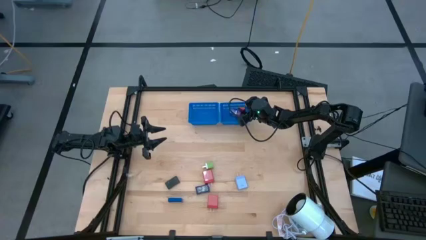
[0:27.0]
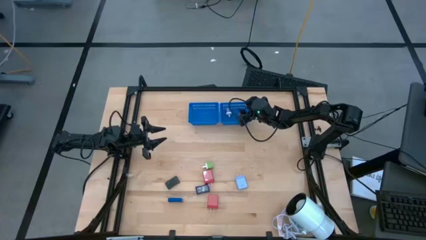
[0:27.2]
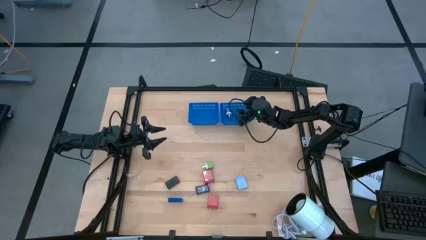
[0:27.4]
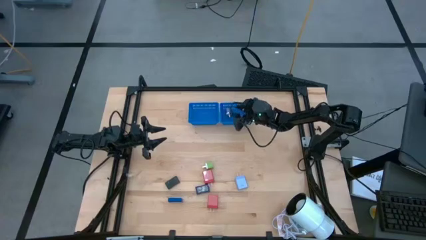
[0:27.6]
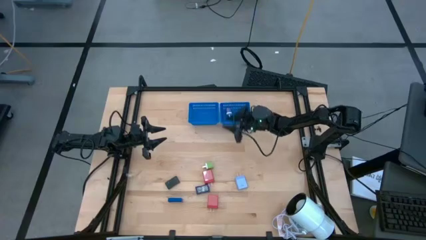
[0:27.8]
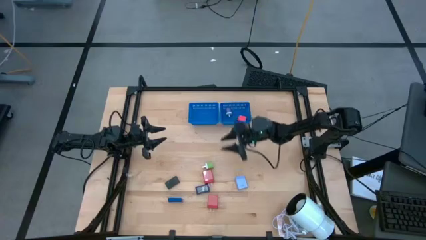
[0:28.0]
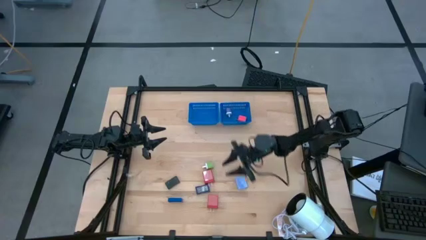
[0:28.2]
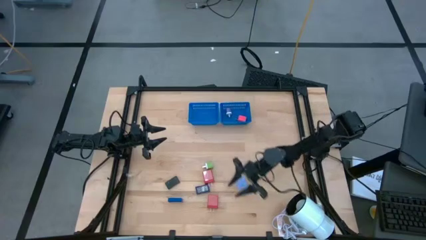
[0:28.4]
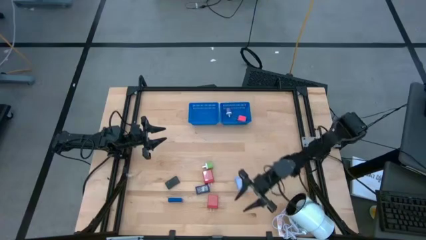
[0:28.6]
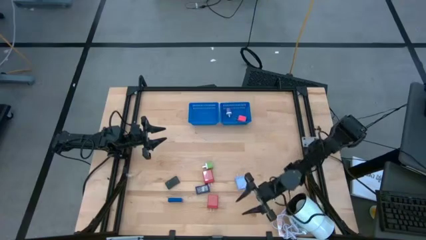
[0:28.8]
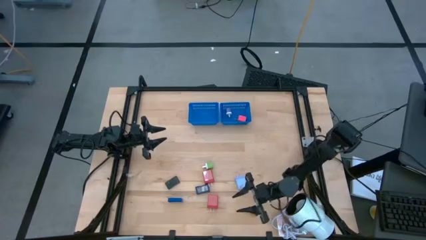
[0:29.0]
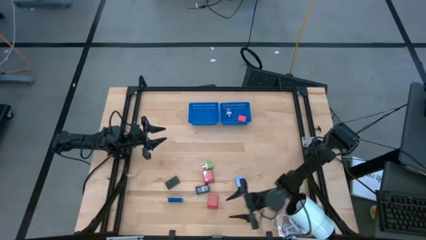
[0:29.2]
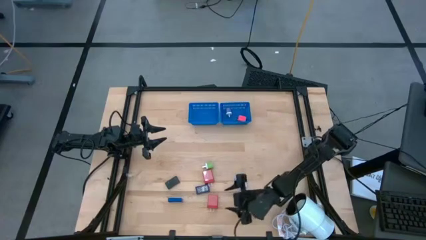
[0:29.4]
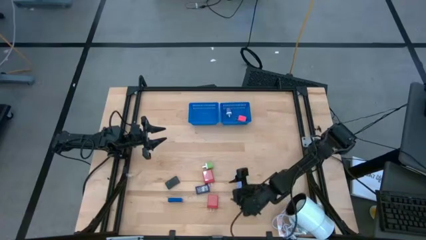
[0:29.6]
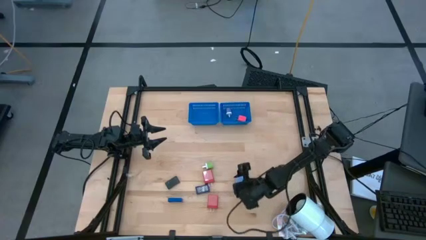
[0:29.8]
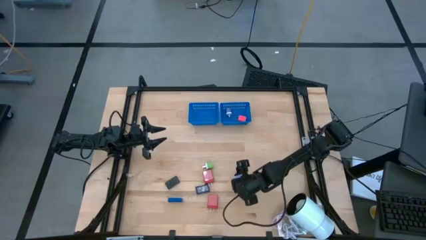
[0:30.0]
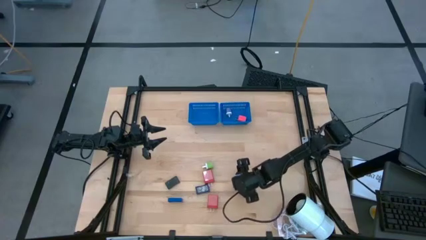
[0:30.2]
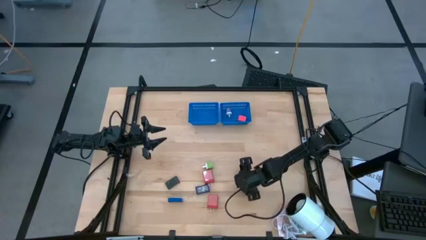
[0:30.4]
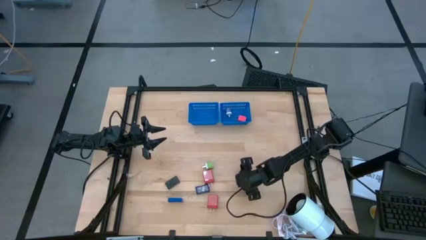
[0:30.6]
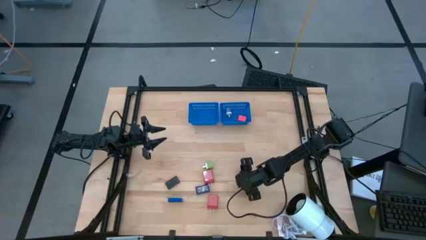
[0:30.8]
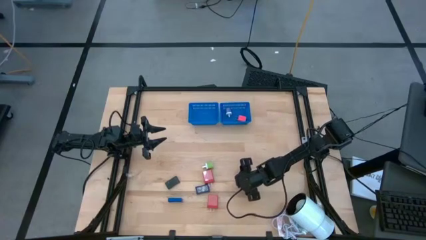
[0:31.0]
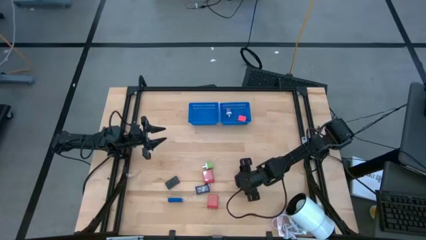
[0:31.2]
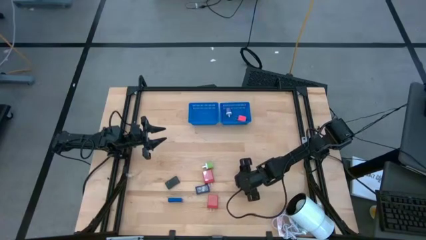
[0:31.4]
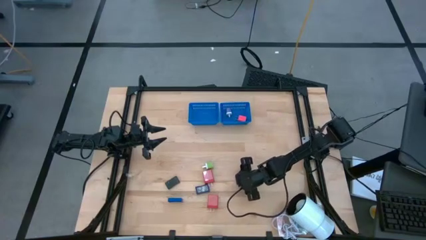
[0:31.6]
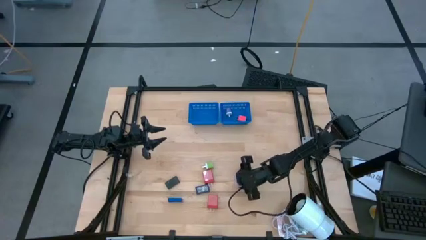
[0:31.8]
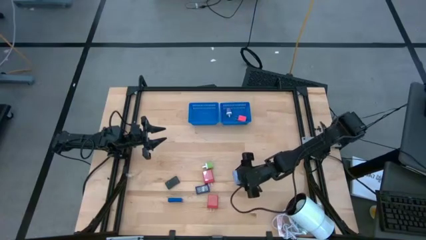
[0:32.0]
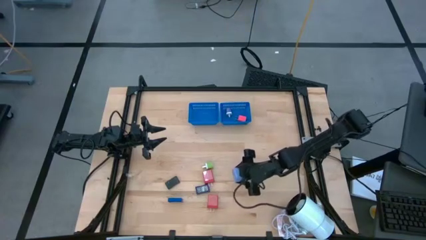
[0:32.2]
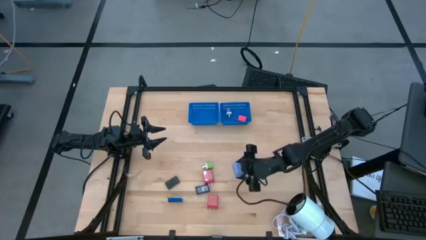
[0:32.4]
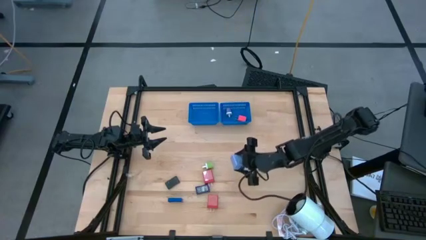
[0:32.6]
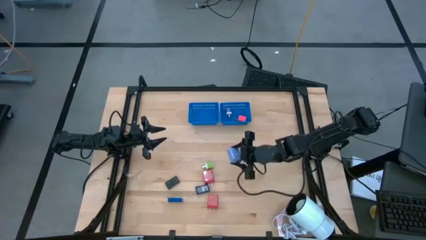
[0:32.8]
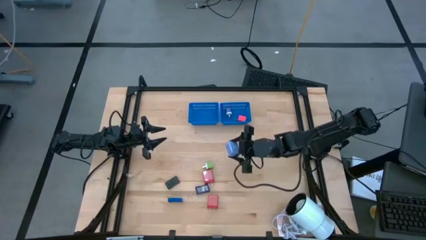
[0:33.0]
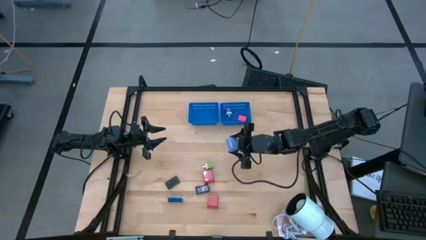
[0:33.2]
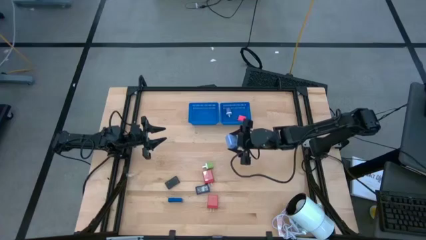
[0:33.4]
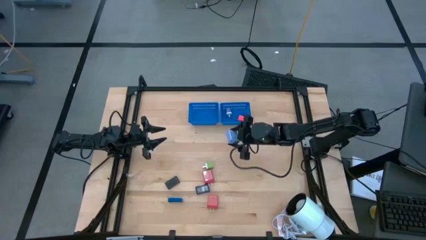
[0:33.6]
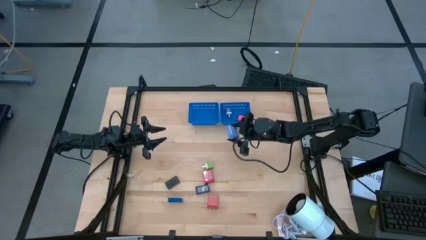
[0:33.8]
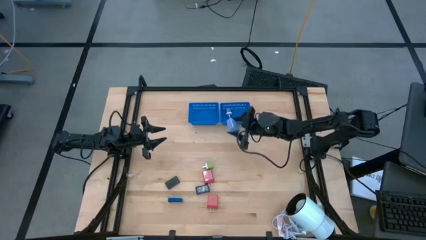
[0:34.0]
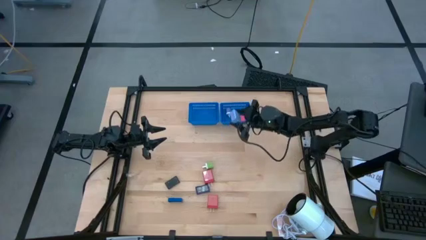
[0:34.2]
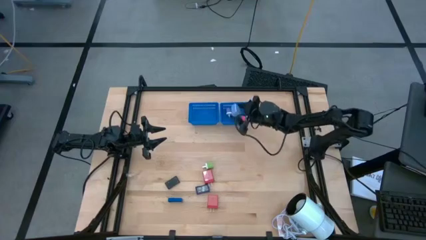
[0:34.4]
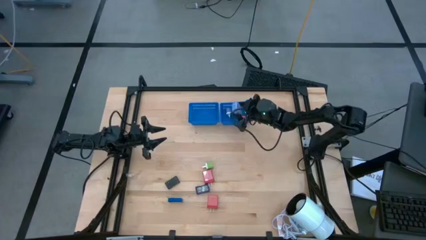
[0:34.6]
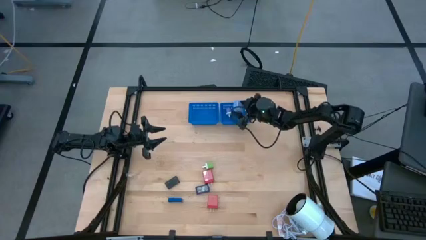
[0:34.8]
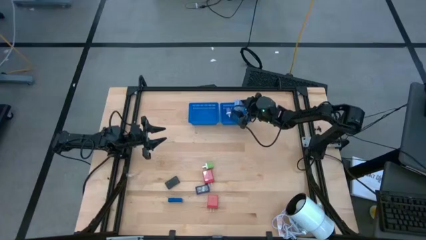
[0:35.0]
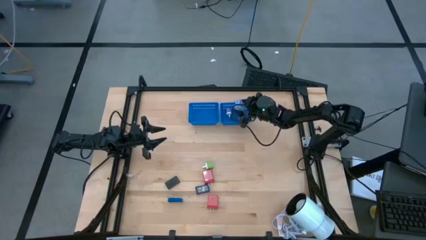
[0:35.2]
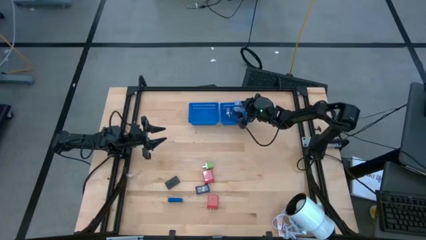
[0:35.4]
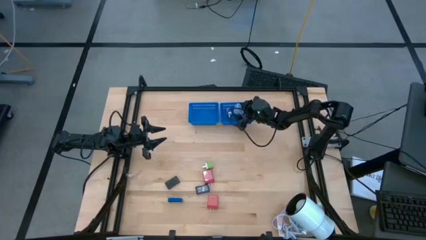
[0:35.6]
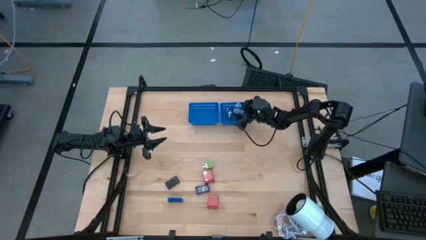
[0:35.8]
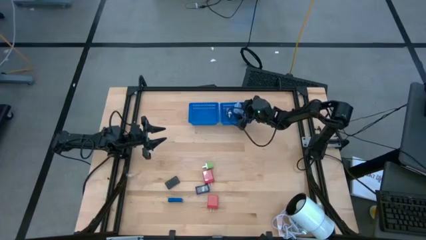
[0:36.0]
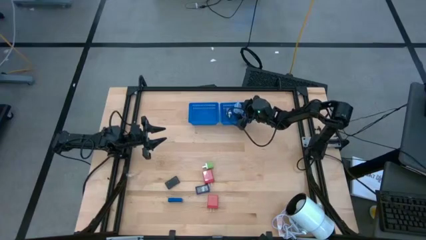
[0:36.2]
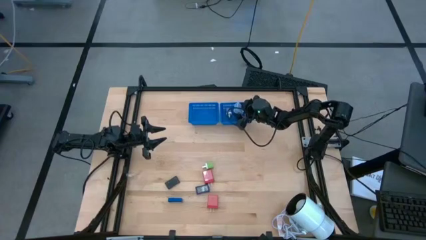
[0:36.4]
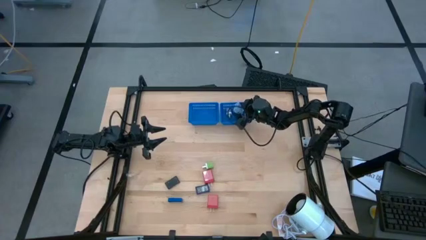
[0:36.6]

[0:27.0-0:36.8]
Task: Pick & Place Office items
Put the light blue charger adapter into the right blue bin

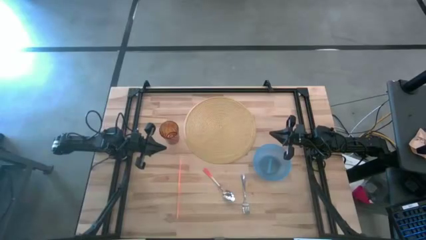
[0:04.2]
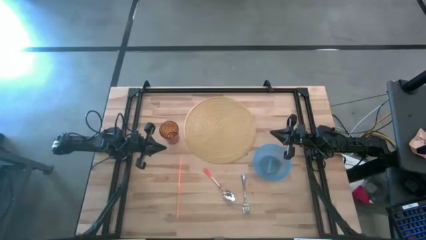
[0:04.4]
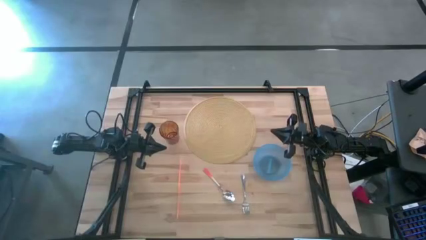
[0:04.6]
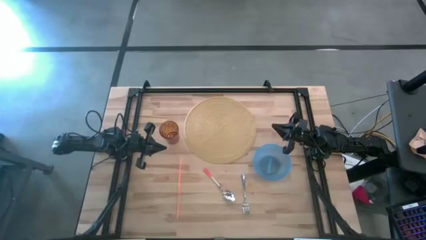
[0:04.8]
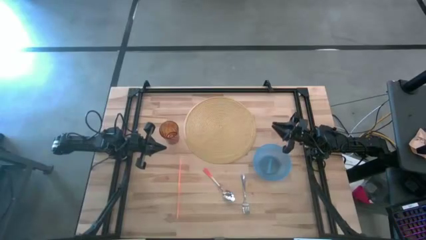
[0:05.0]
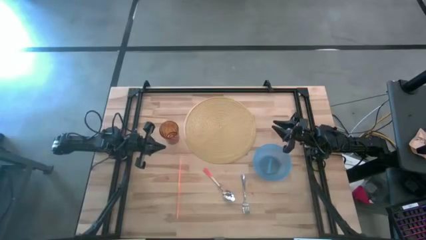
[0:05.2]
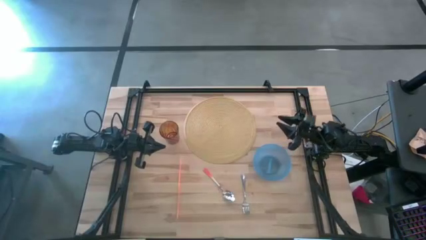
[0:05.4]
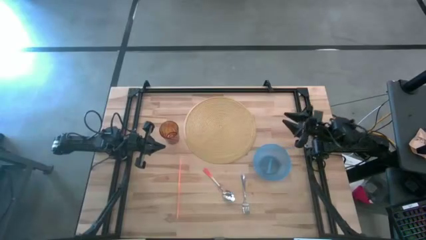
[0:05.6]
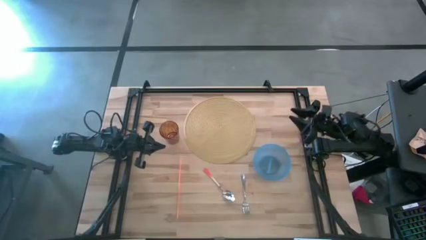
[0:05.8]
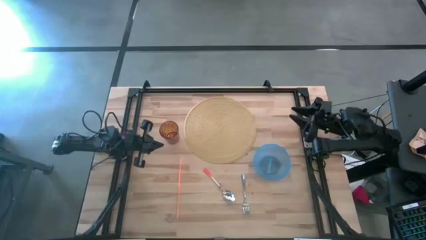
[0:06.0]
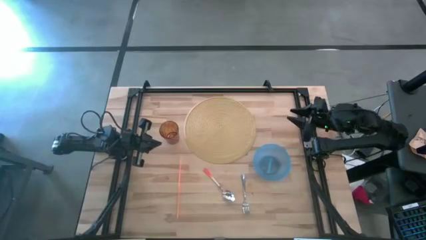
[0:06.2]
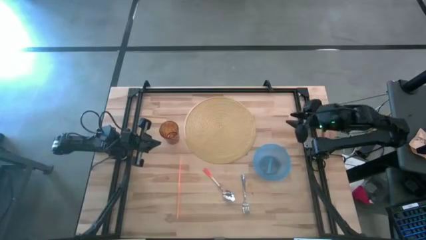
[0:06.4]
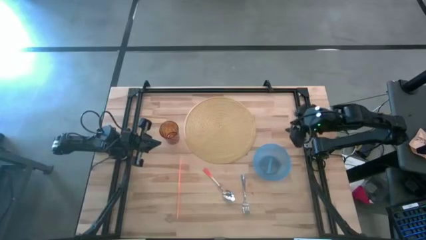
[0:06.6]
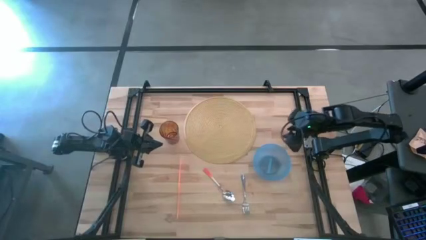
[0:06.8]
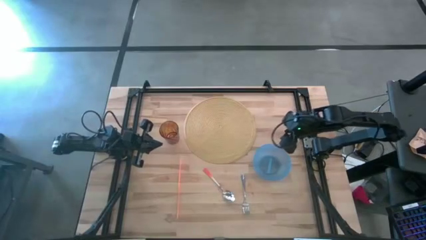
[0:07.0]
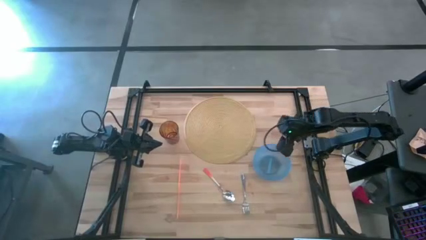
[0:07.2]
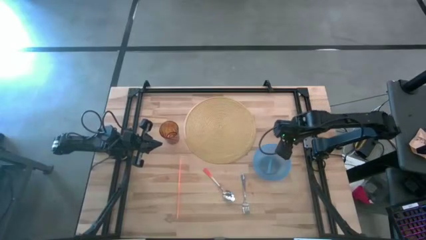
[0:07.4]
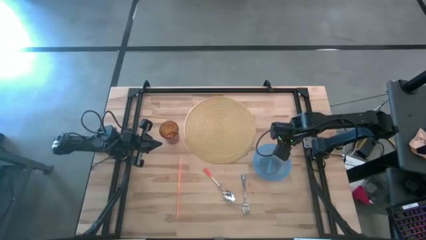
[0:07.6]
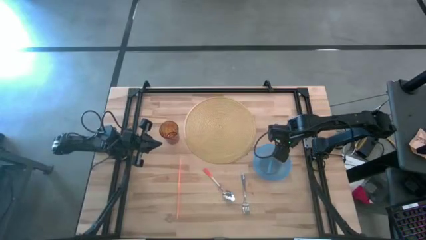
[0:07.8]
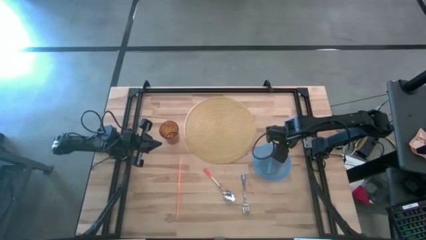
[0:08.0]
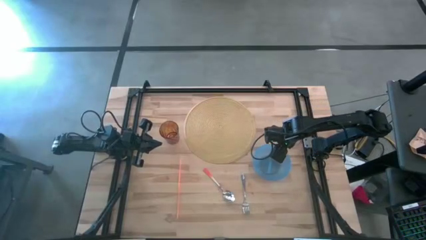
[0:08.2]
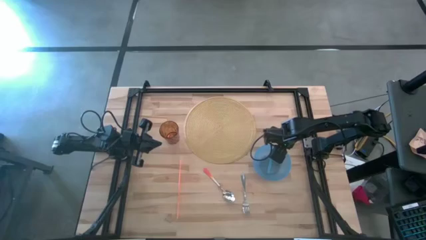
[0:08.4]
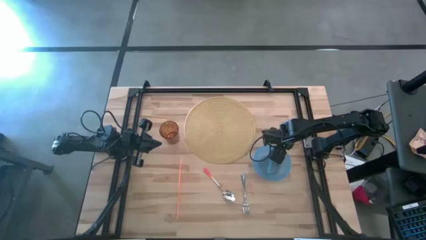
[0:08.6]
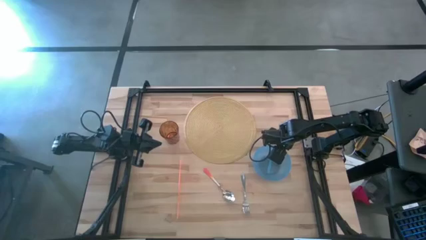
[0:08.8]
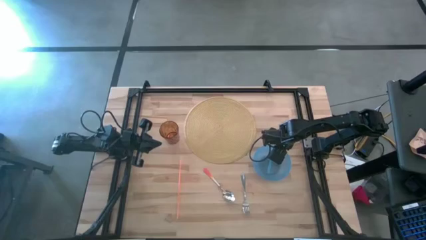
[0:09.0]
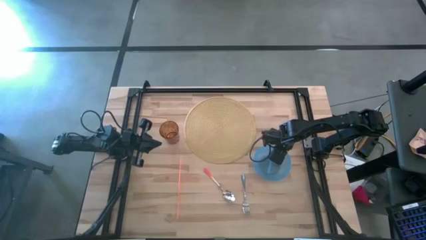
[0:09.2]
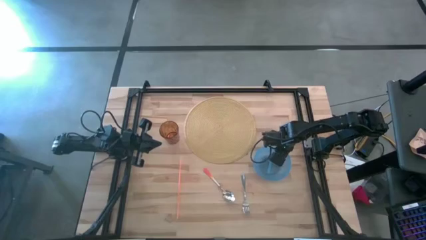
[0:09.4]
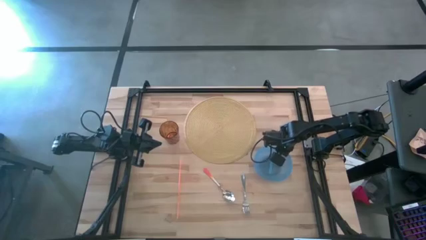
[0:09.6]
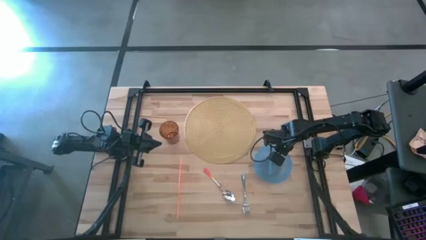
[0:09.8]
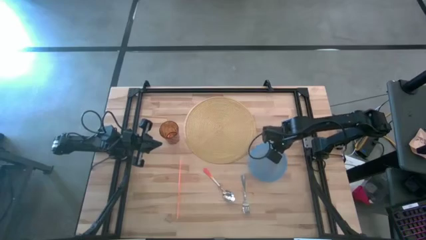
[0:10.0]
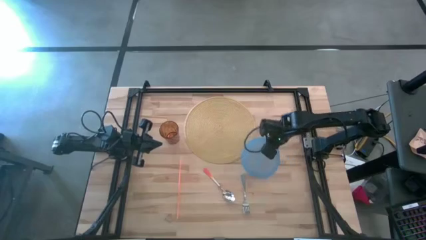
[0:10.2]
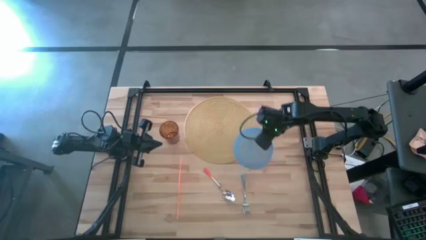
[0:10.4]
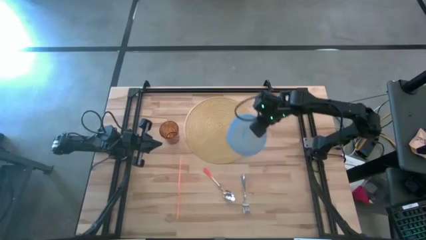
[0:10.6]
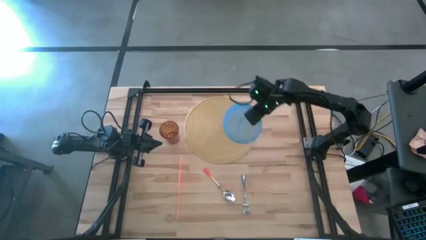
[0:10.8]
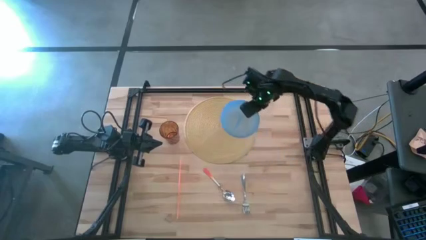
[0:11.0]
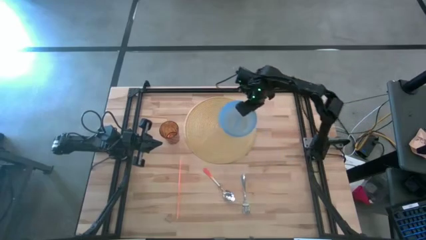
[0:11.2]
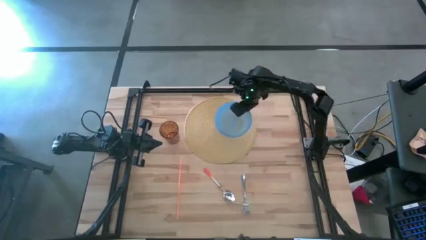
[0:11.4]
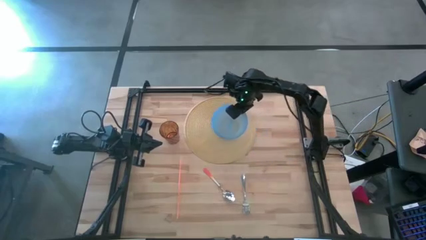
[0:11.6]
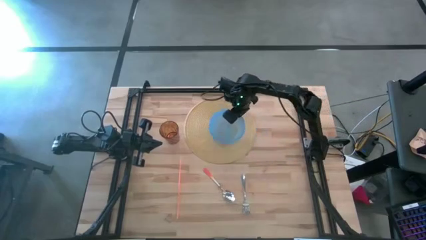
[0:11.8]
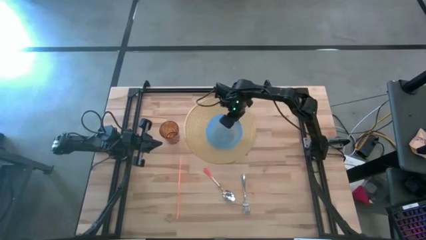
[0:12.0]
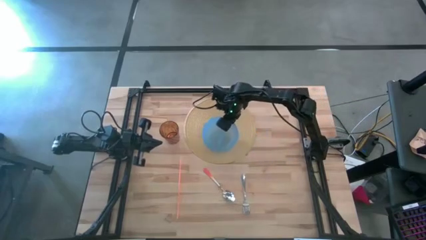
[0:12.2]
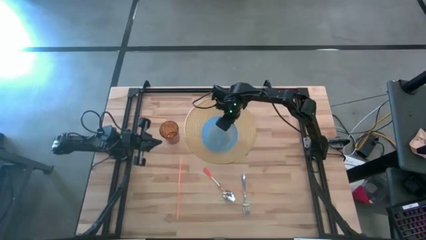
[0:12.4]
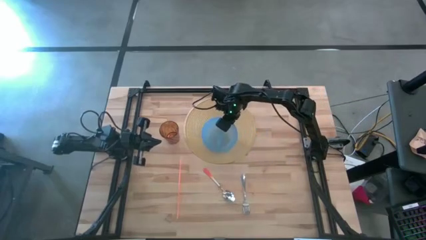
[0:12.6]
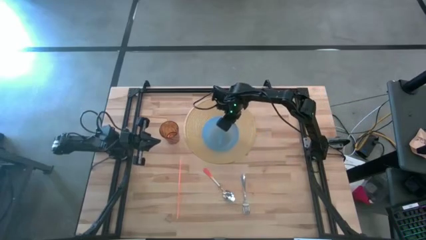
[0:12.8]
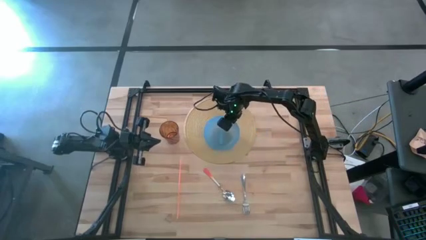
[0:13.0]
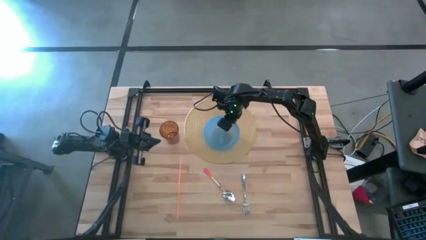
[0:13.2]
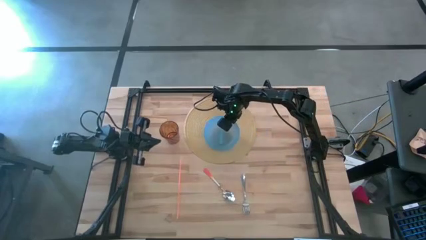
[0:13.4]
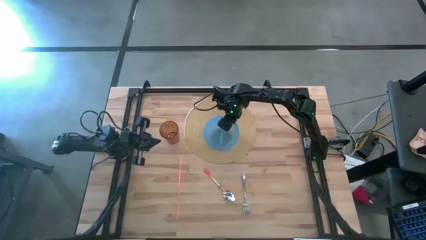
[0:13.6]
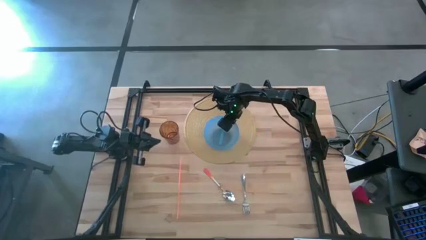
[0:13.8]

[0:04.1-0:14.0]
Task: Pick & Place Utensil
Put the blue bowl in the center of the brown mat
